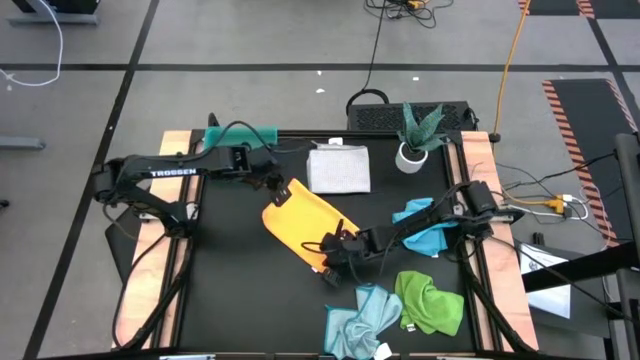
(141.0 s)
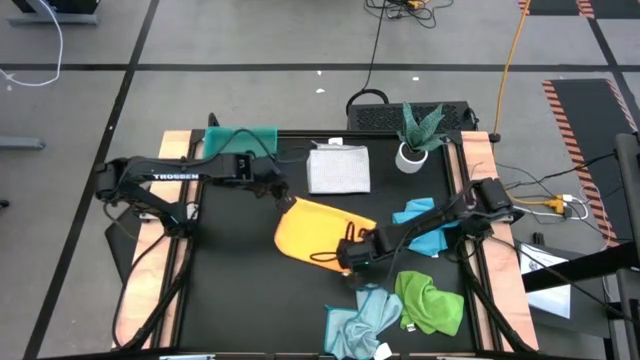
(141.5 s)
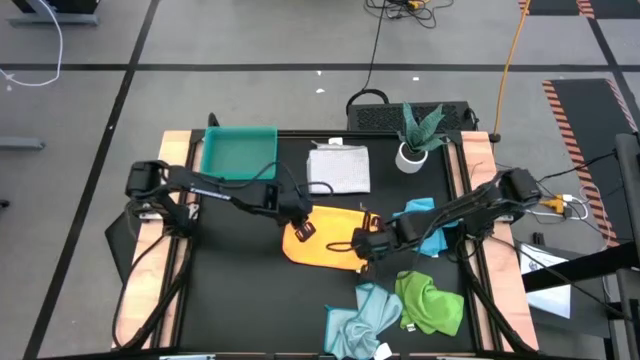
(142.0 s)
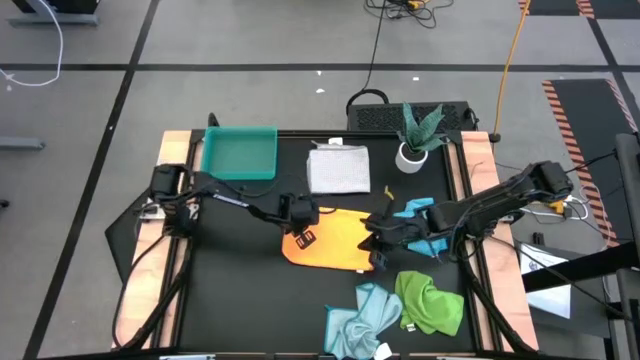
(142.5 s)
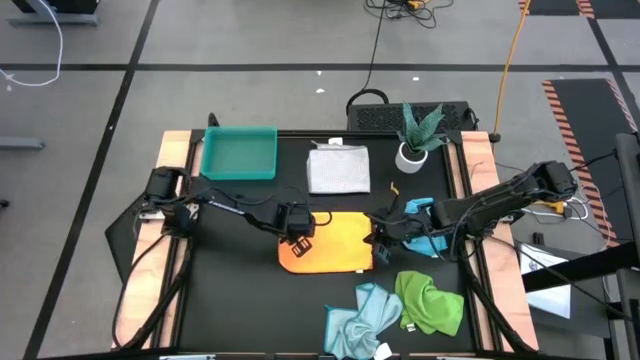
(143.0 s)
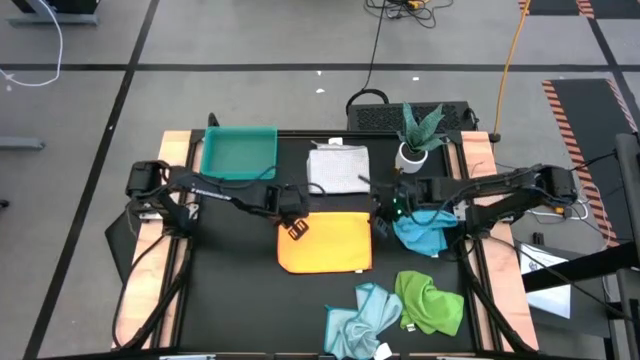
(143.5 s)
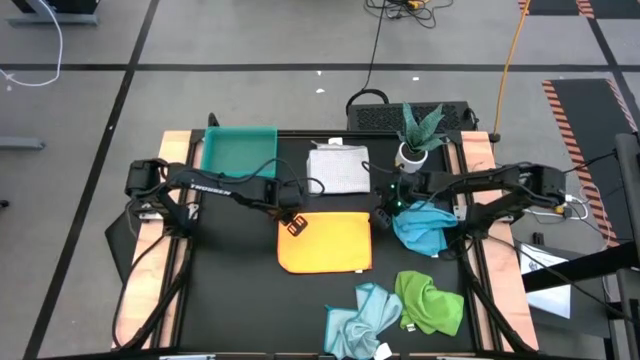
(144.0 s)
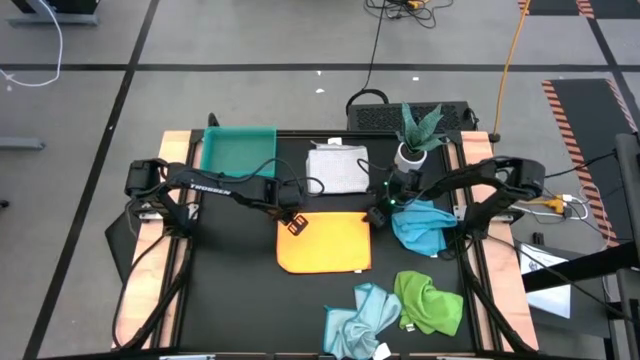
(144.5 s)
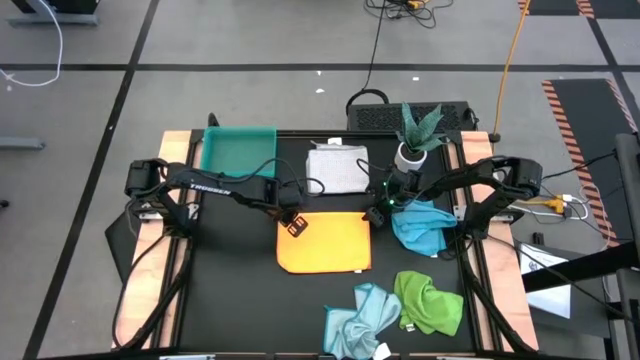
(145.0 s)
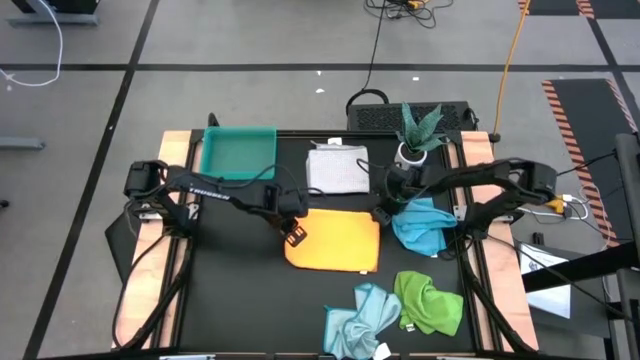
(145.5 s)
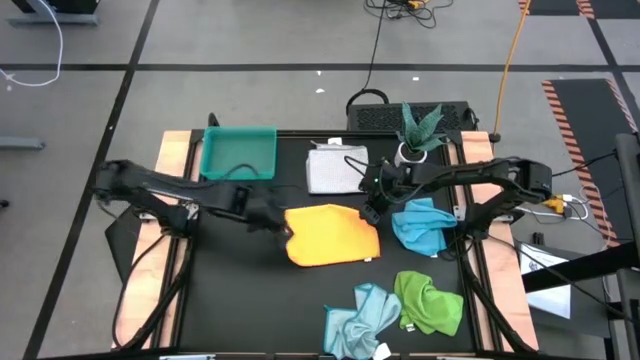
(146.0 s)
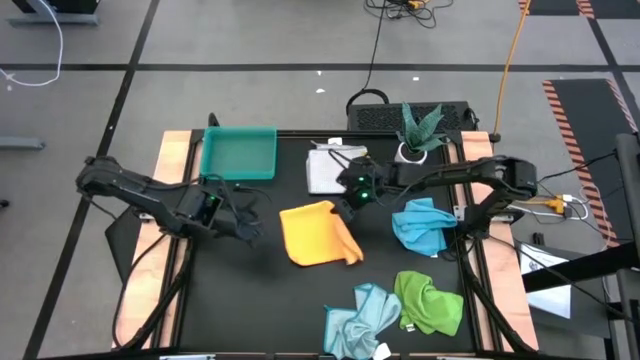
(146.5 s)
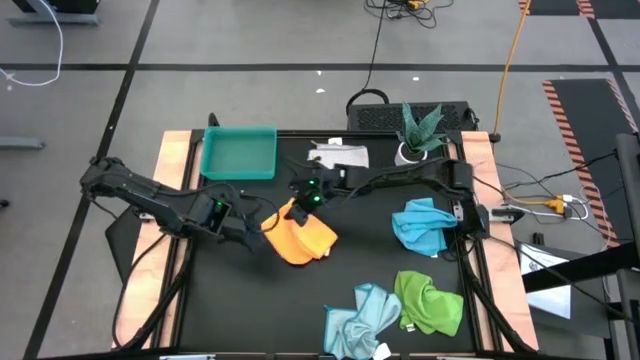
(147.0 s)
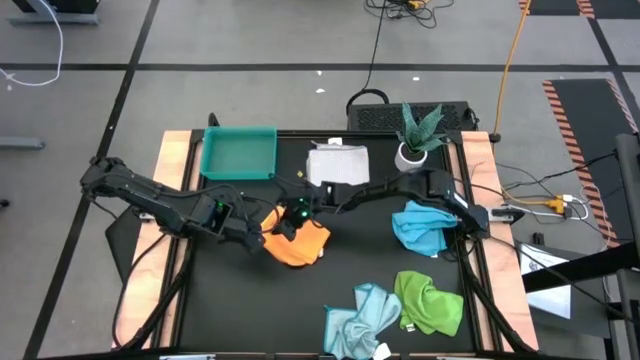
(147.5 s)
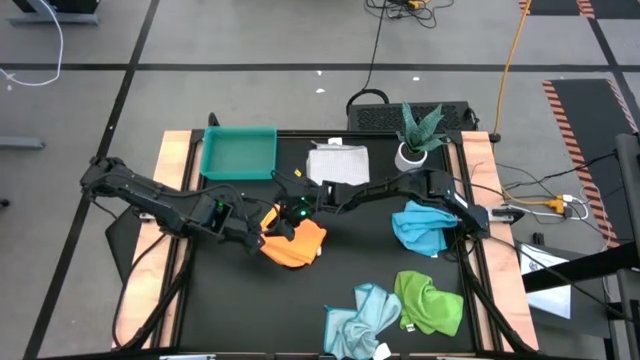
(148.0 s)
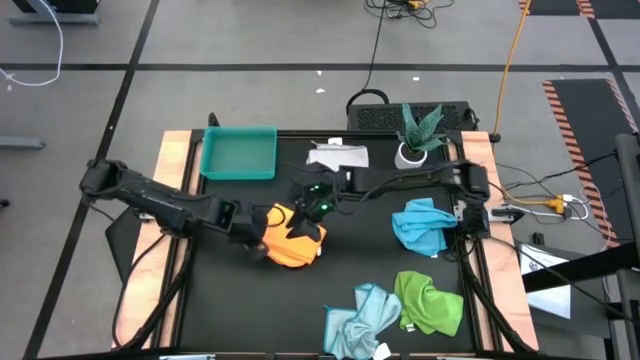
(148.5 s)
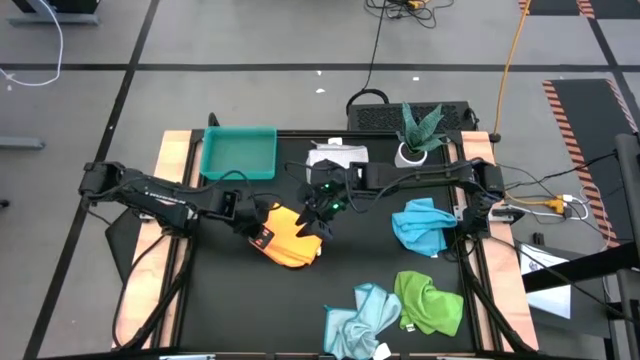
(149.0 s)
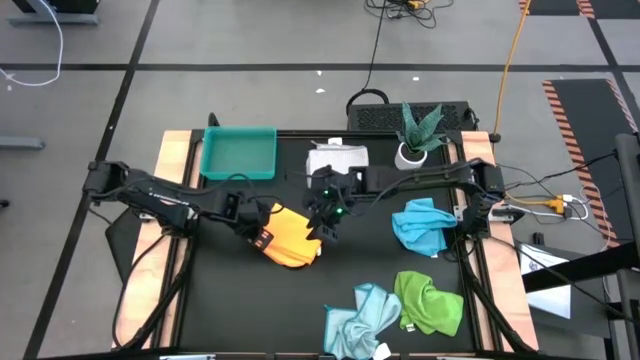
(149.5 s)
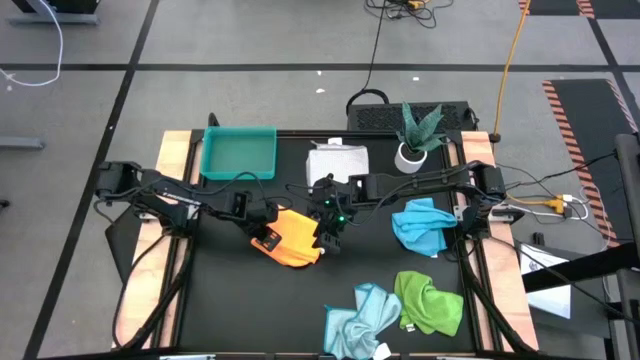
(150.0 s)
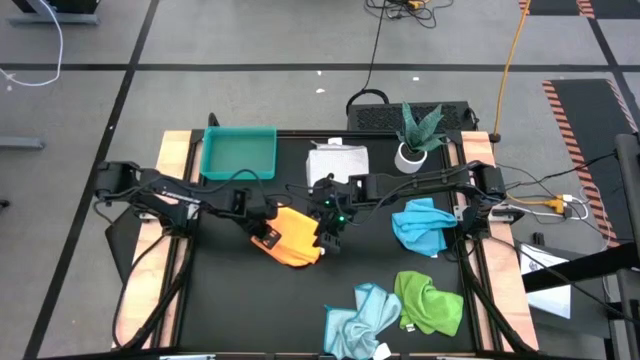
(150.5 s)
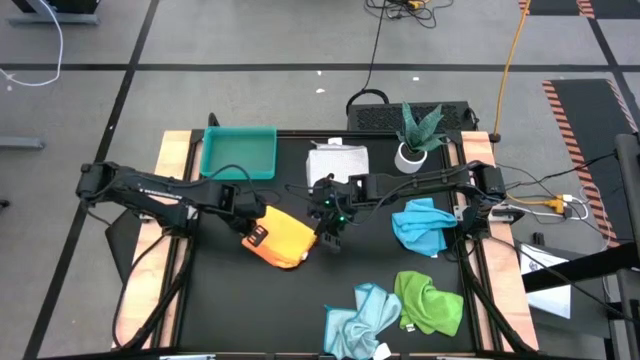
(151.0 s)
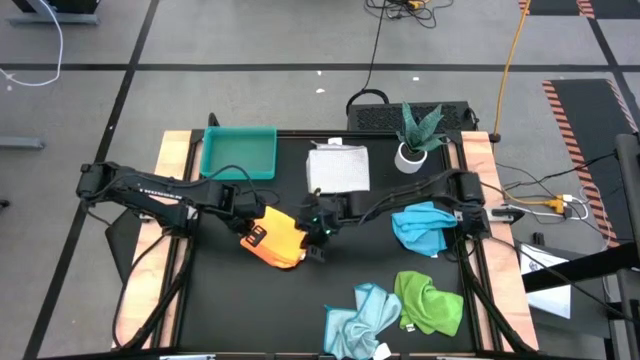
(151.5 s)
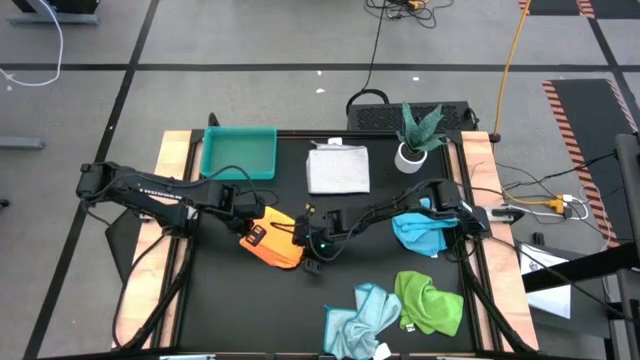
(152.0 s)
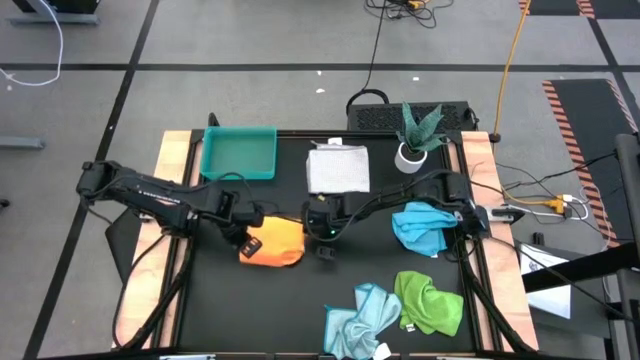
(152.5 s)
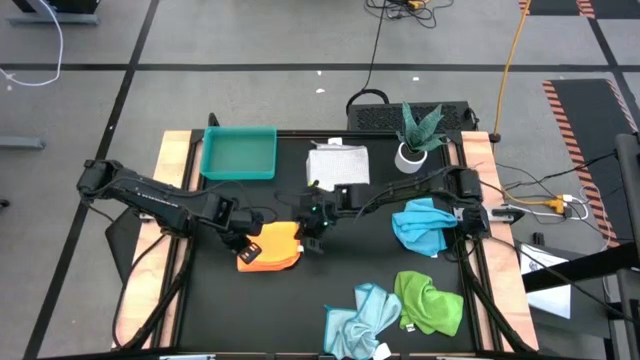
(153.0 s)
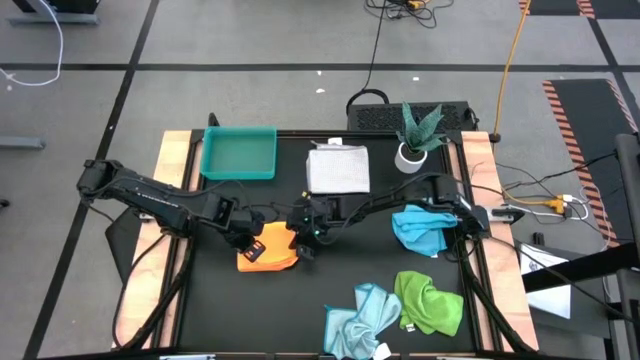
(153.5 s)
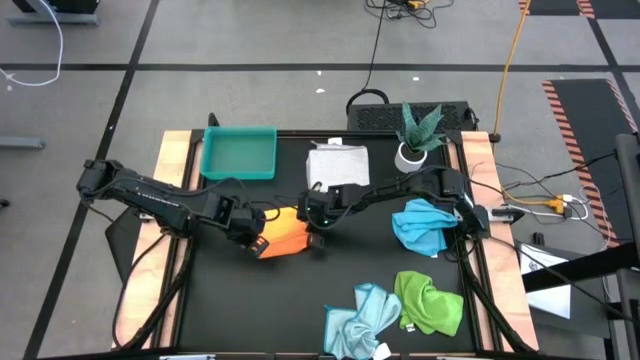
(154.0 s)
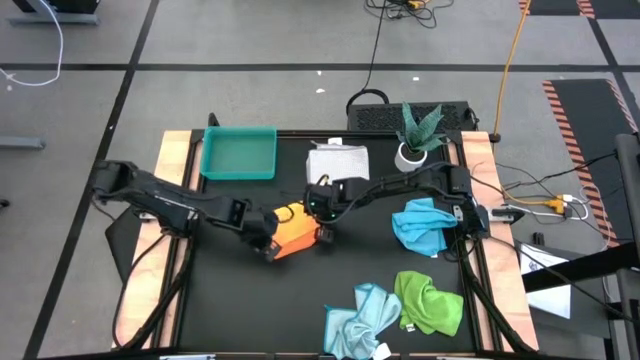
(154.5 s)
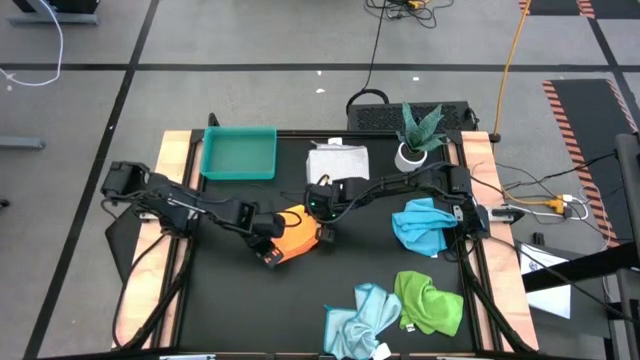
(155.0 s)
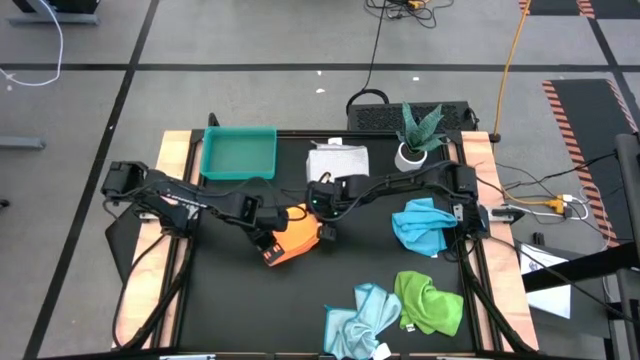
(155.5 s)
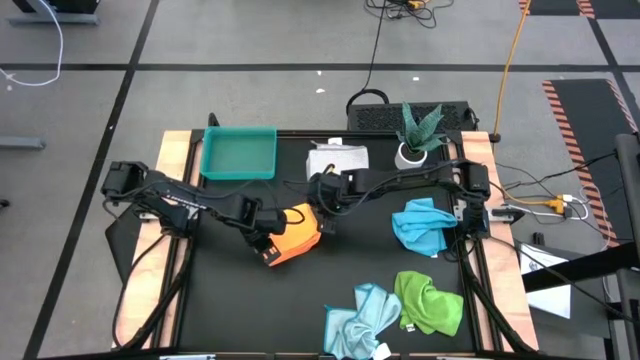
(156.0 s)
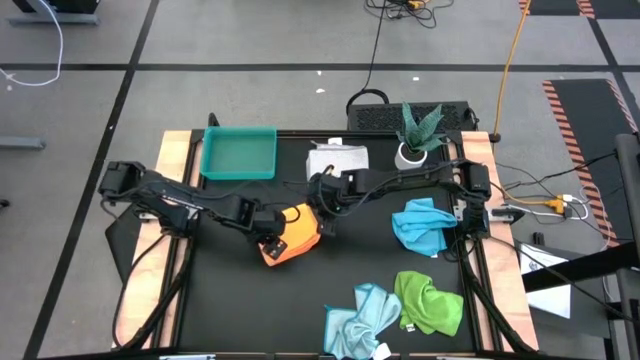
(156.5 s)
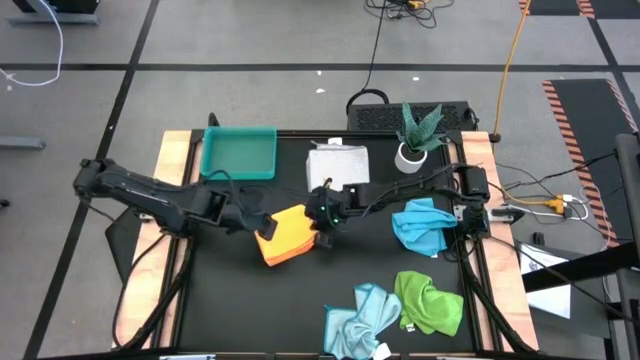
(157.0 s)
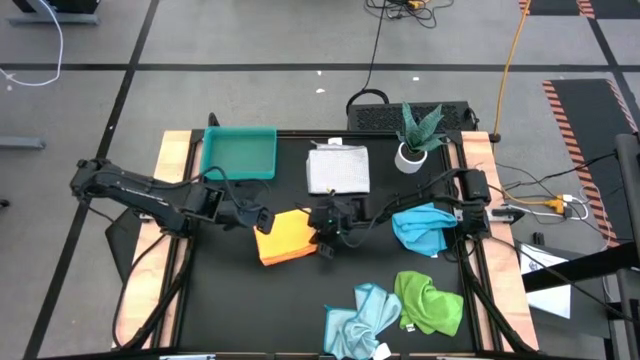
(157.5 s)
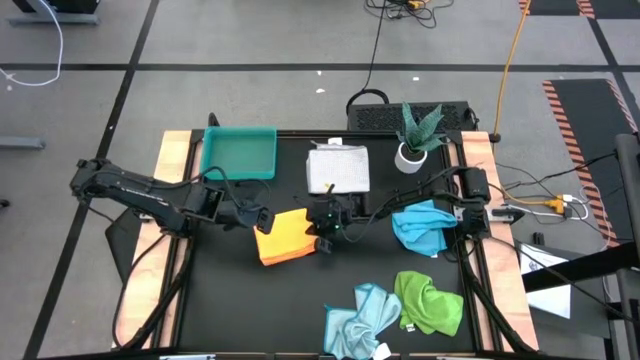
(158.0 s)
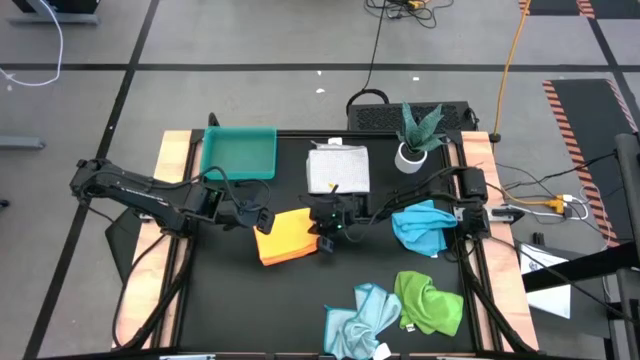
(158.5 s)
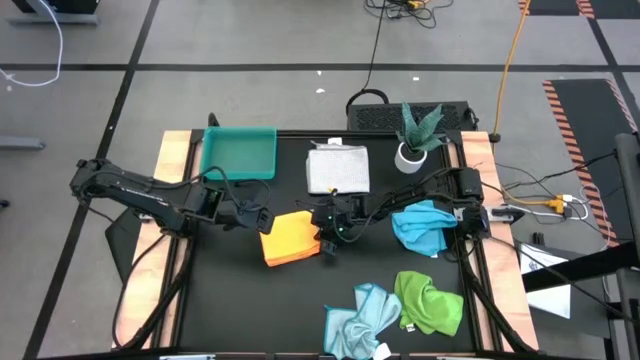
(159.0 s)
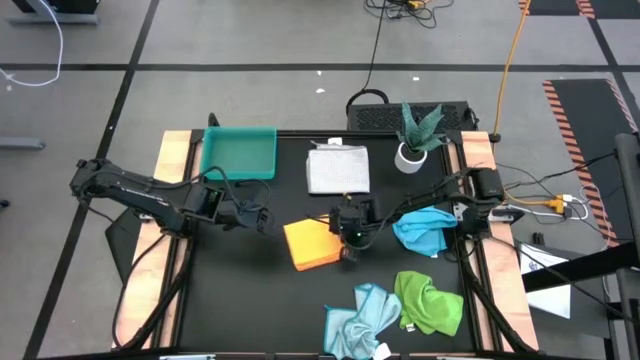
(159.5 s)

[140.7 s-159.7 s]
Task: Fold microfiber towels
Fold the orange microfiber towel

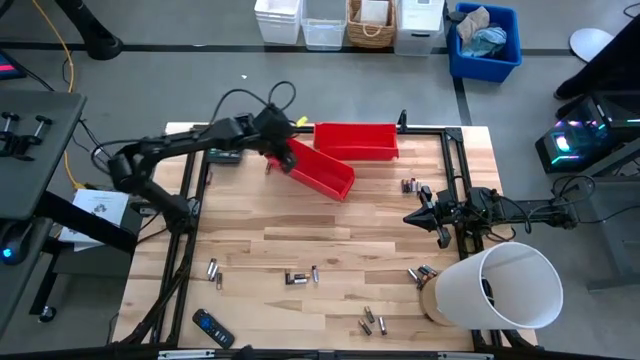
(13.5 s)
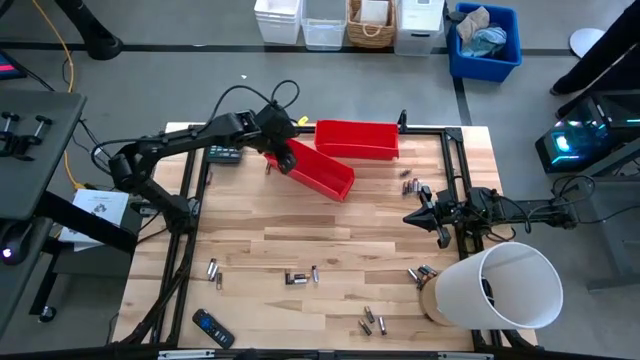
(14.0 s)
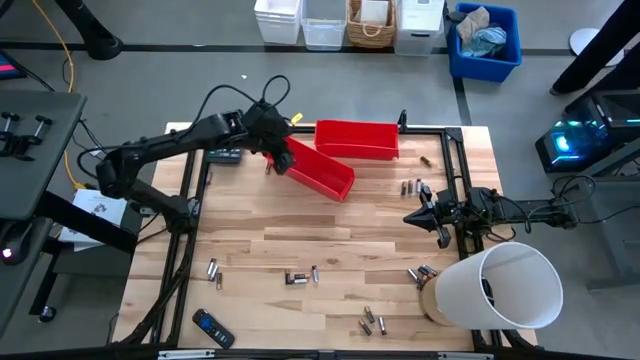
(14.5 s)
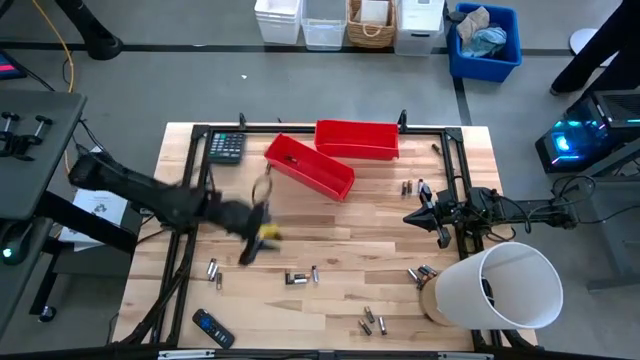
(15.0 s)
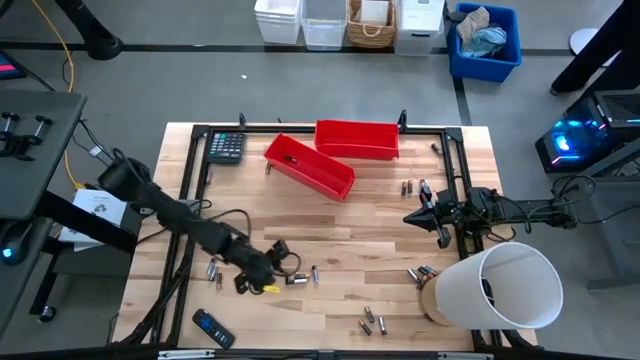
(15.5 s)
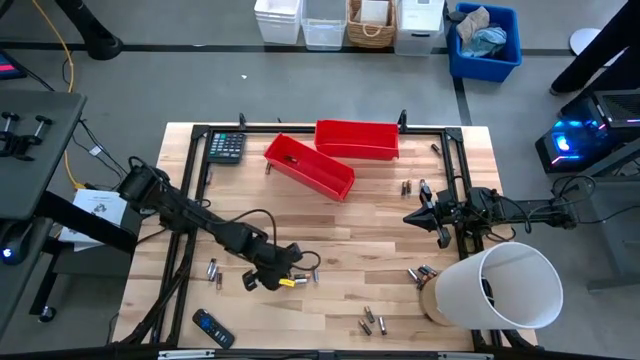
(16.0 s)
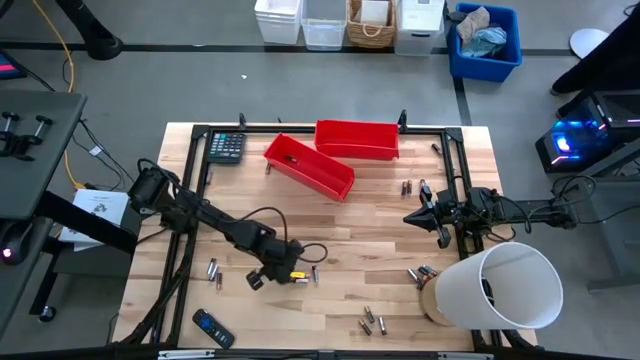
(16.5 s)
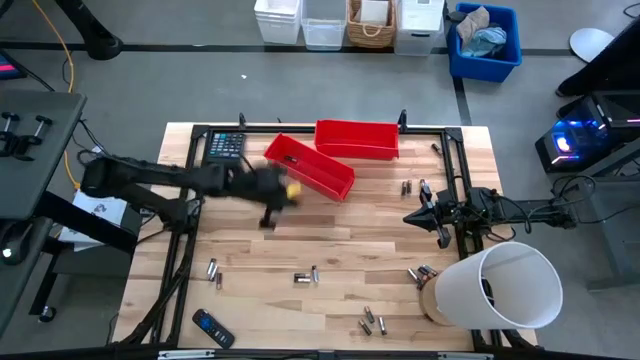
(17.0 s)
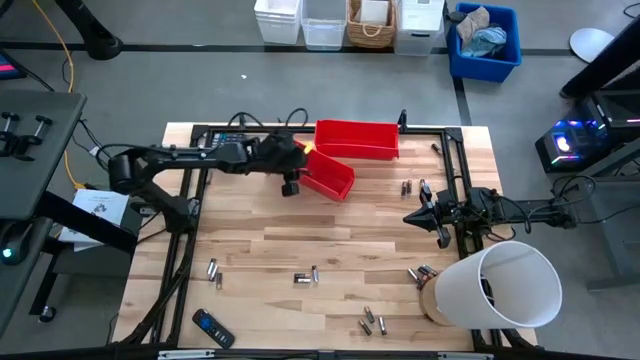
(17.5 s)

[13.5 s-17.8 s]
Task: Sort batteries
Put the black battery into the bottom red bin
